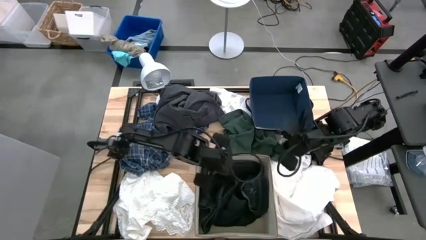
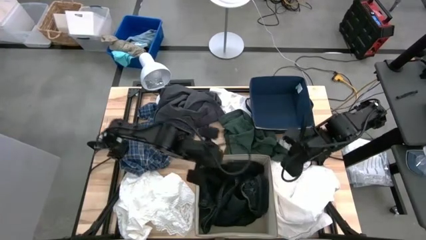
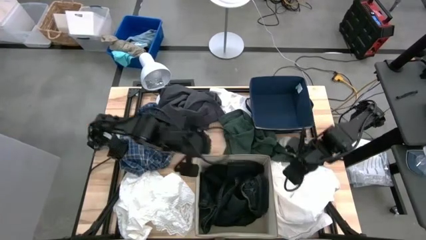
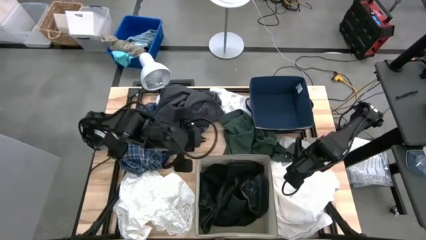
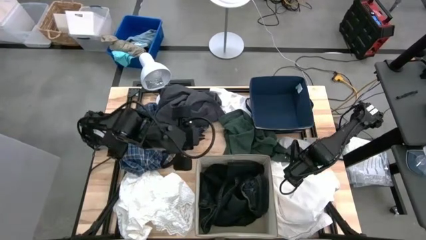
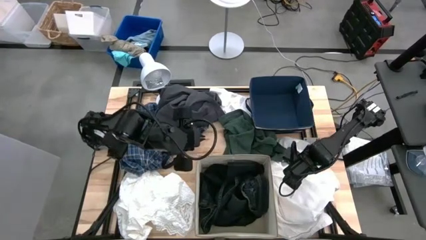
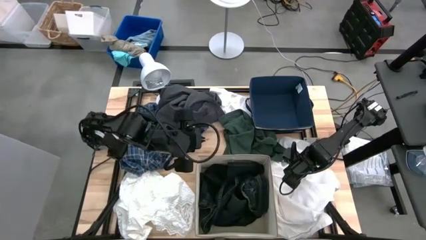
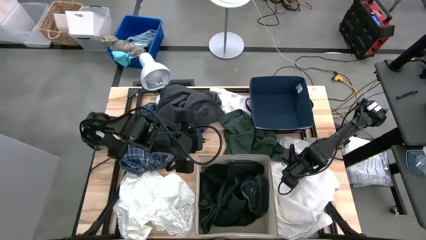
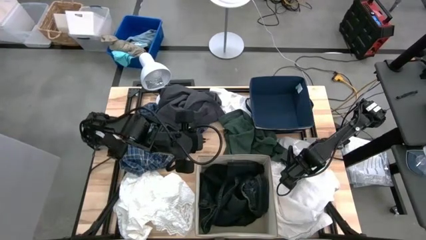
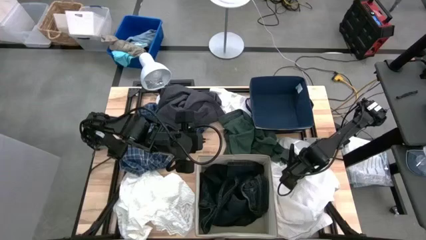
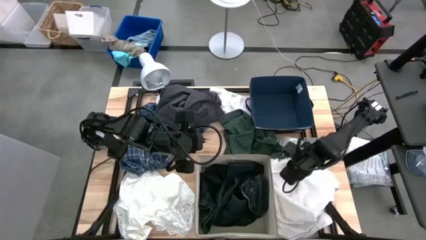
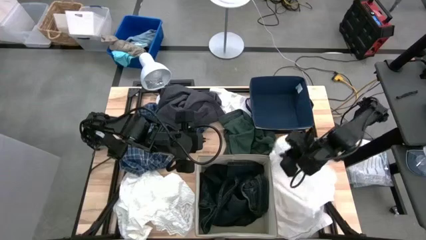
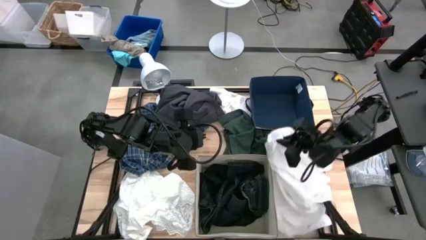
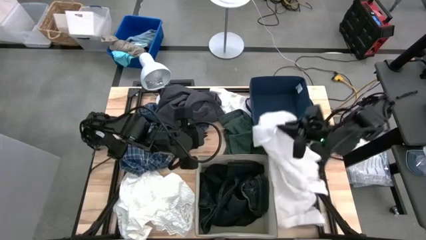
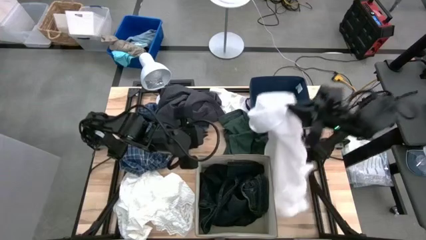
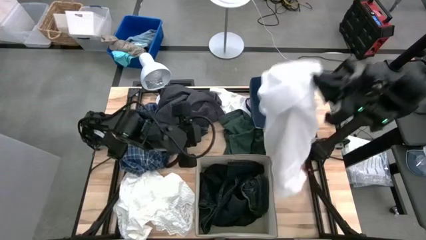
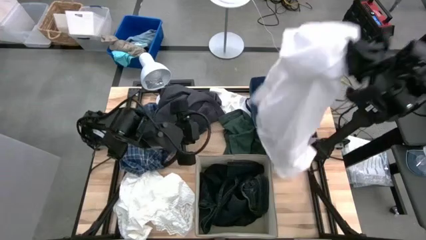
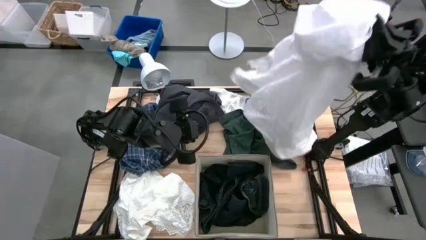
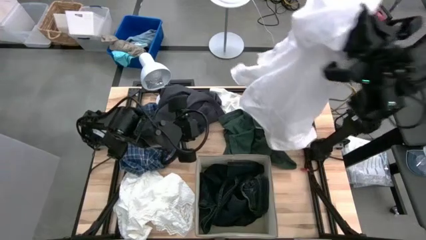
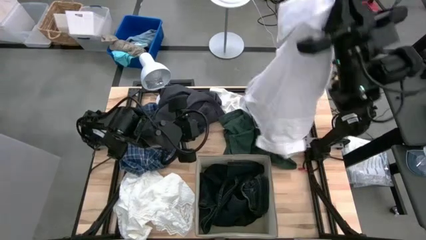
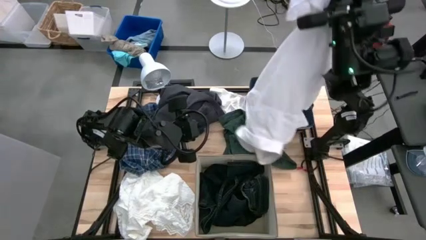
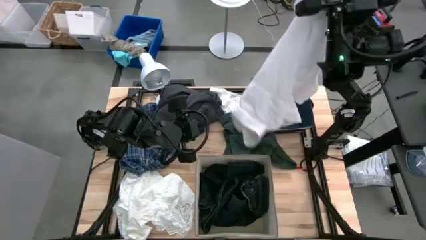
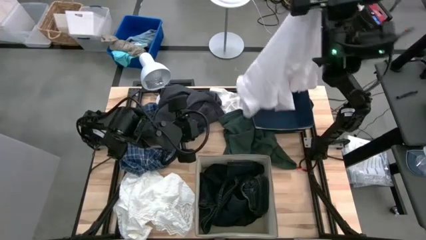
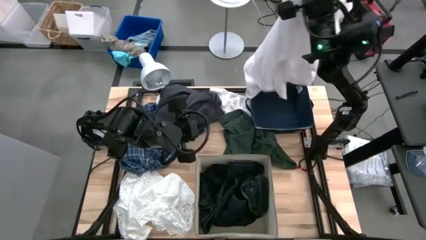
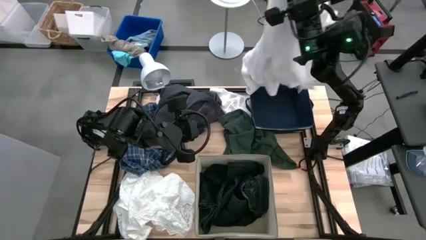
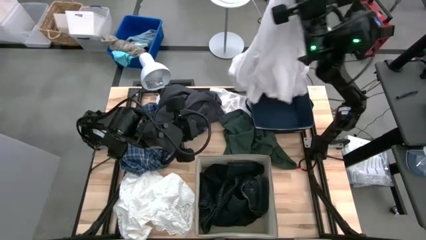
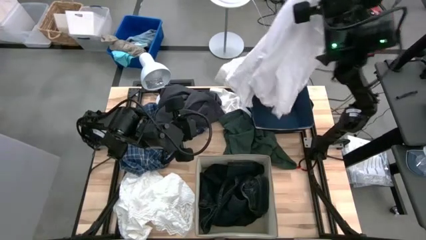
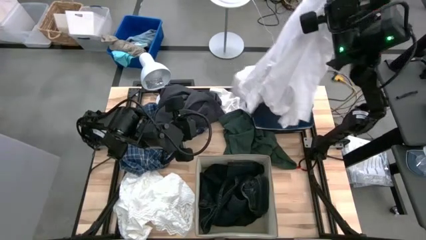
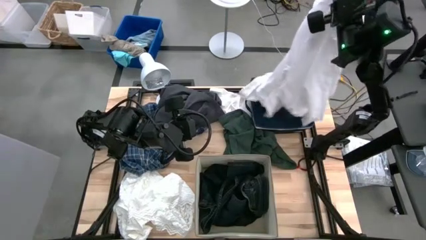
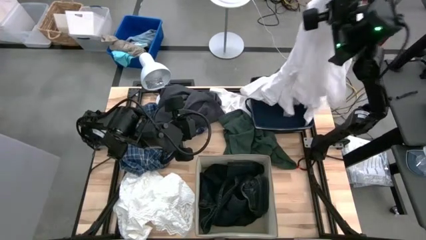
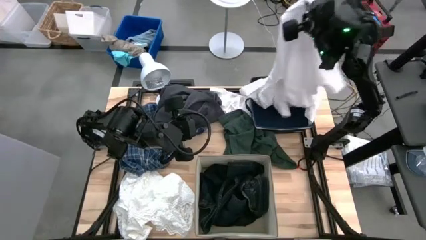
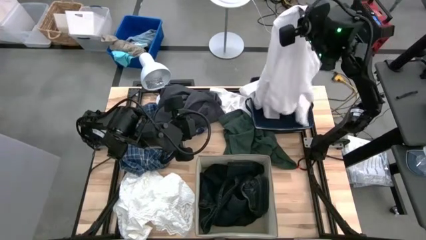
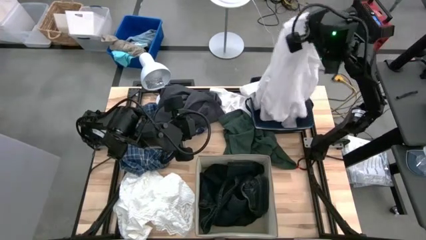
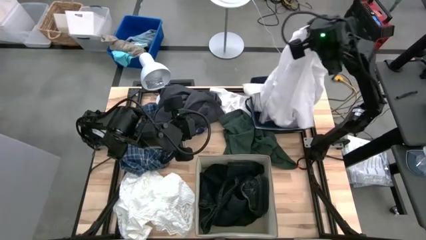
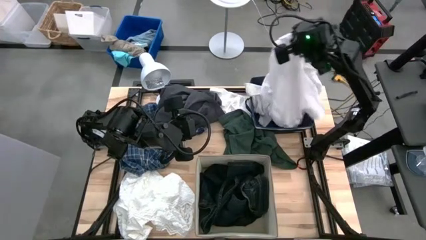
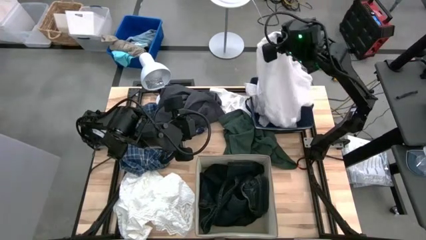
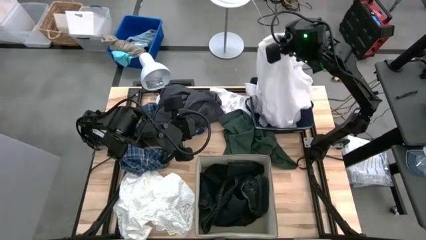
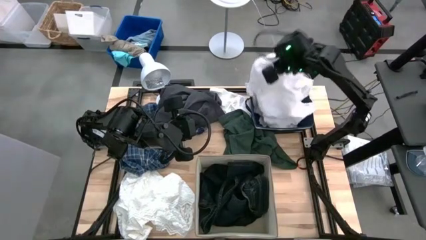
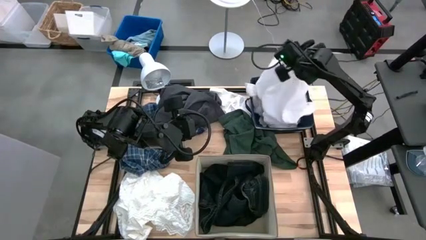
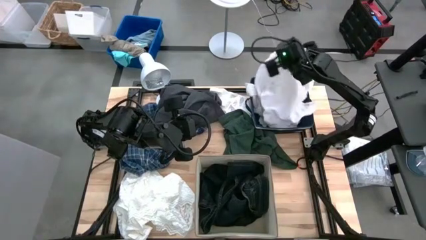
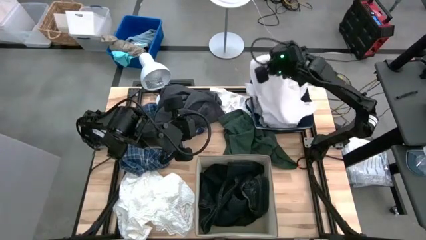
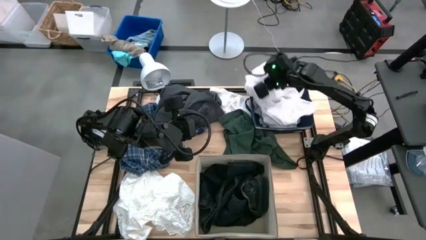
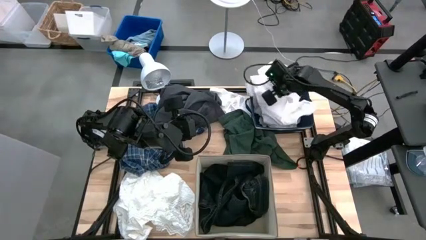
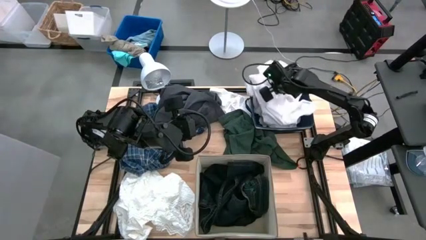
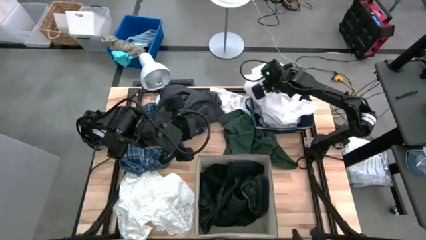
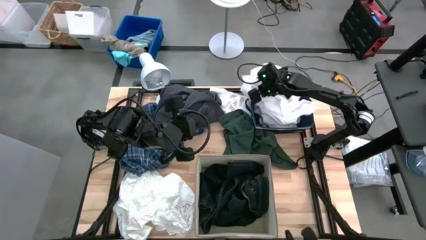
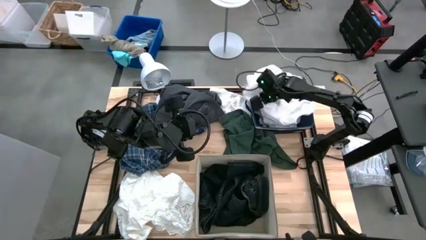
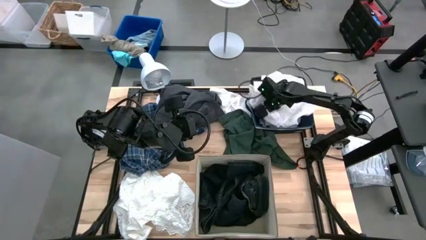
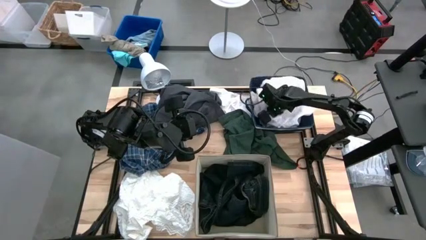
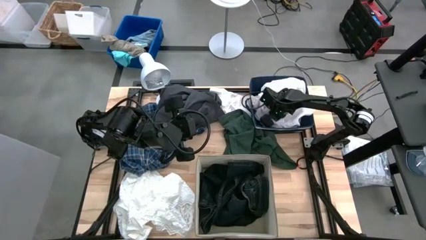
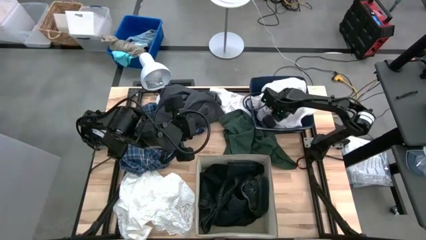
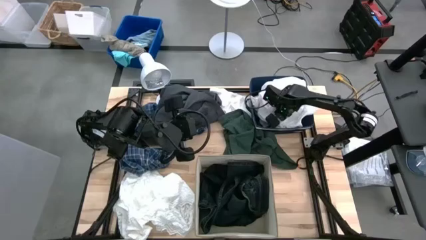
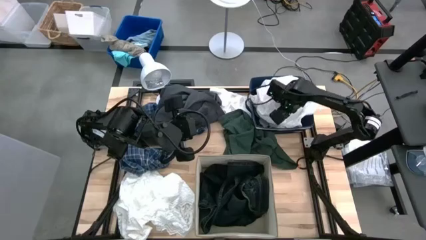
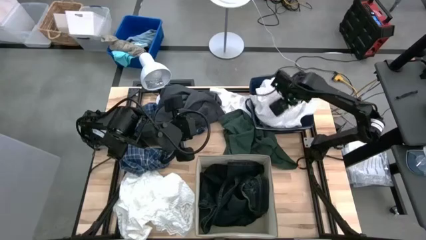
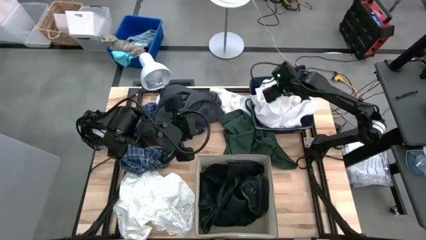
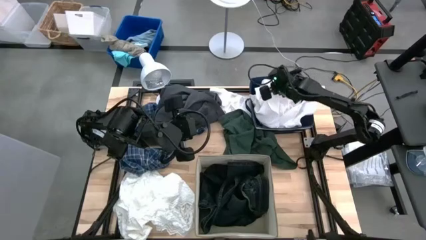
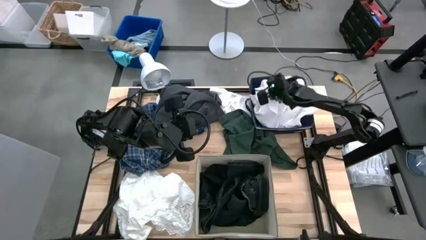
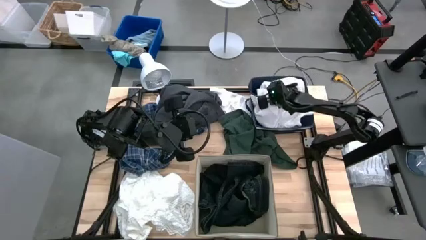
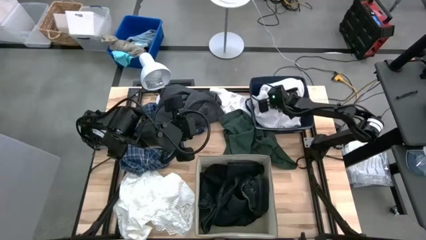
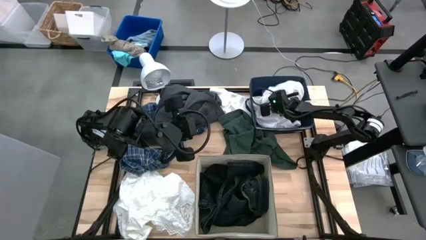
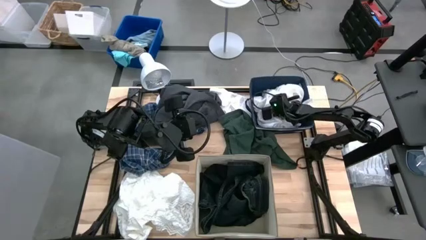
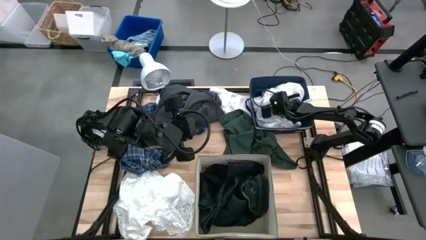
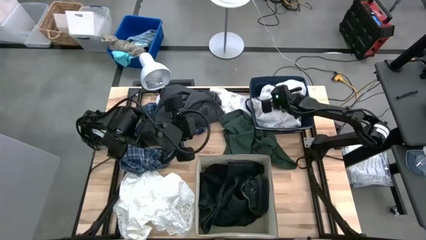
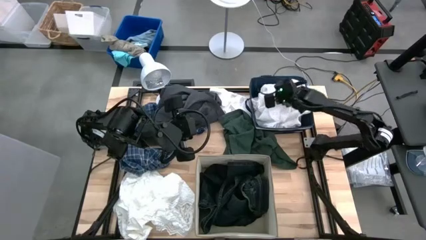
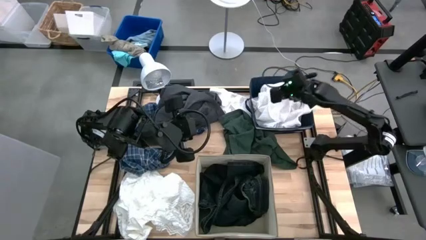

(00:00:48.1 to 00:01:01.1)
Task: Sort clothes
Put the white polo shirt into the blue laundry organizer

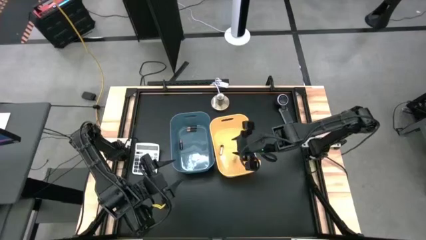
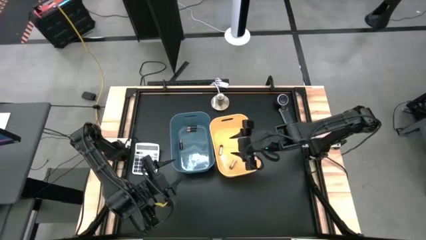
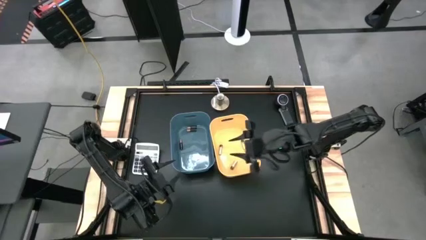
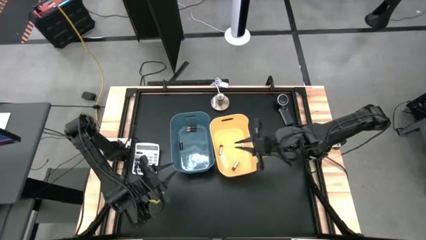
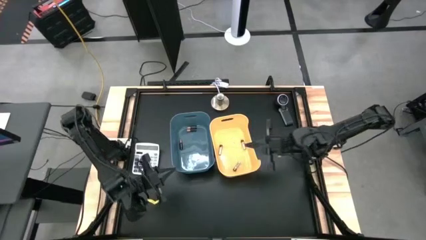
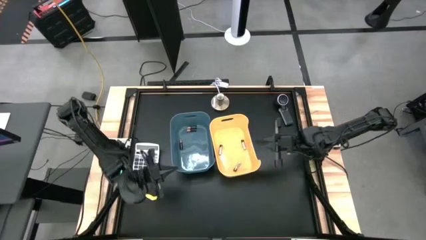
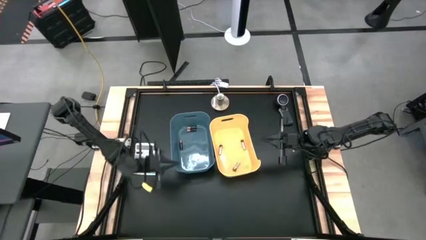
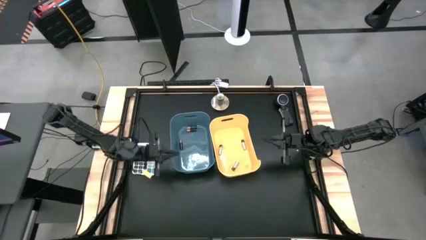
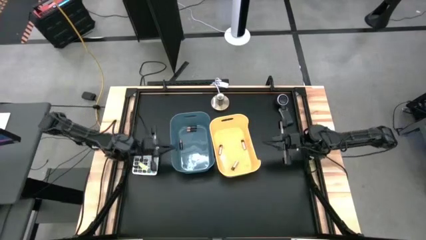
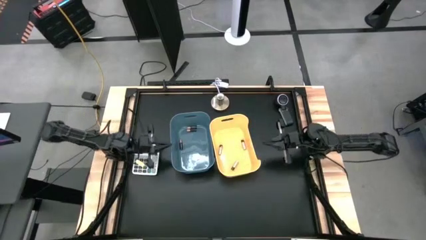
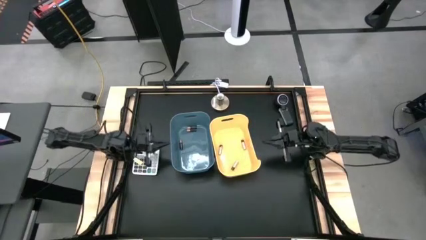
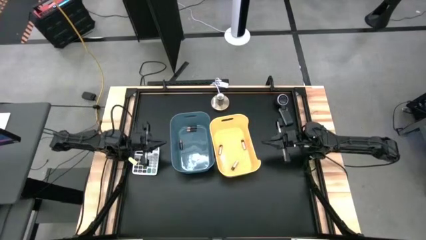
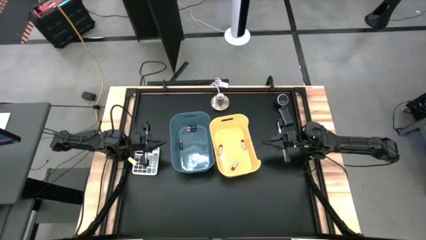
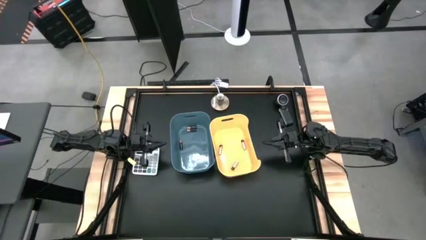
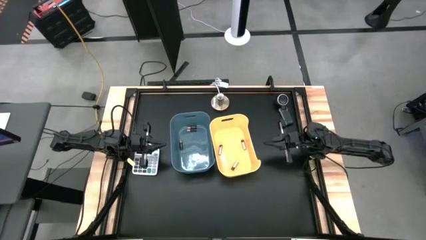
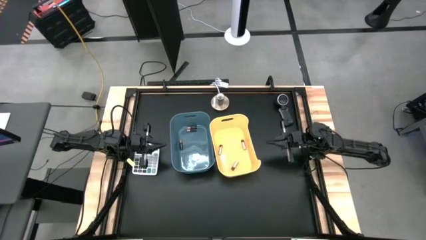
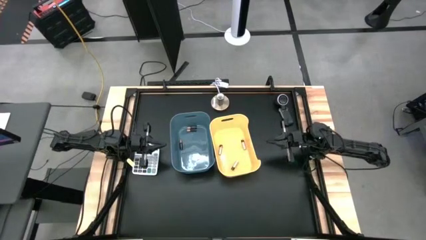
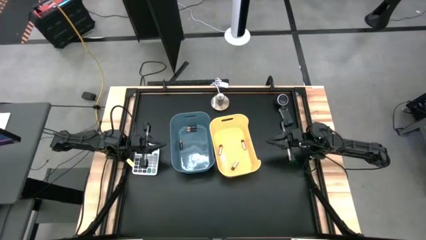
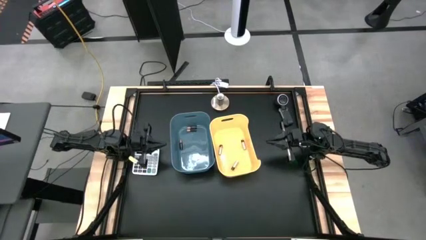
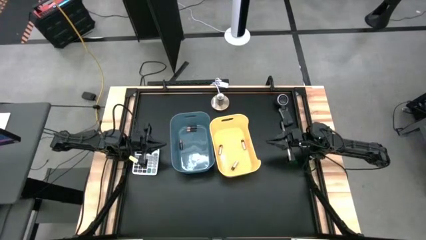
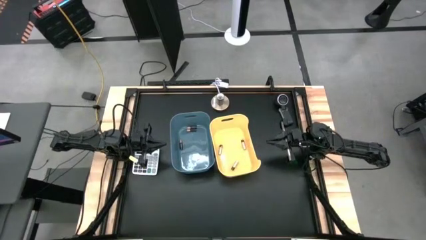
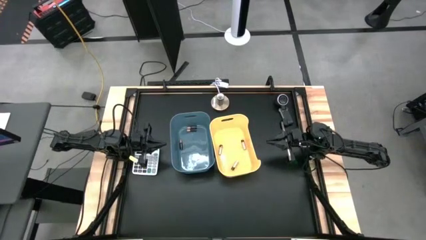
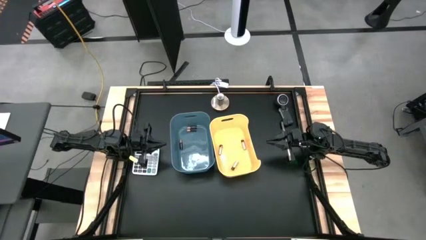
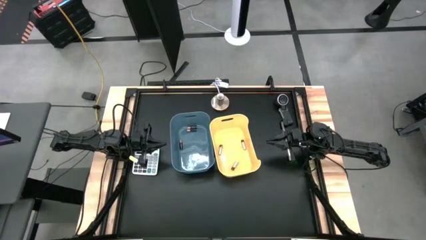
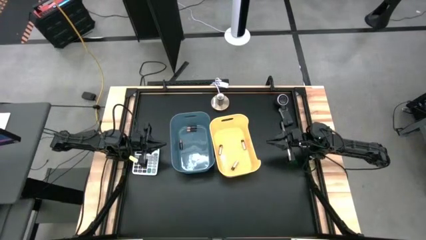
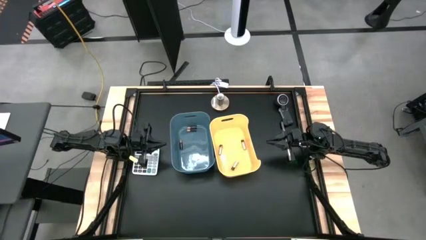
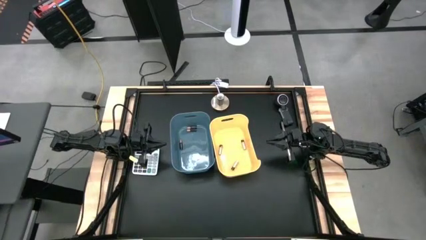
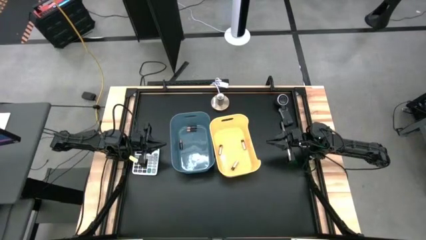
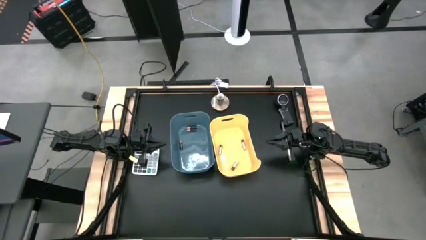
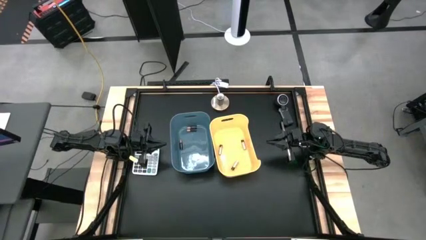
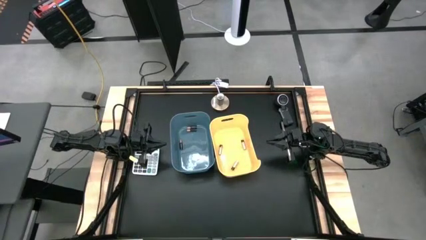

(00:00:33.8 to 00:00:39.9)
Task: Sort batteries
Return to Home Position
